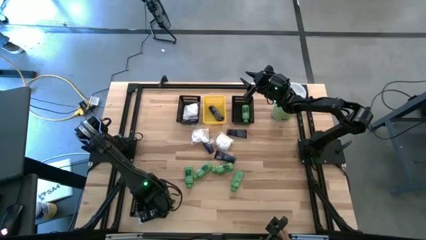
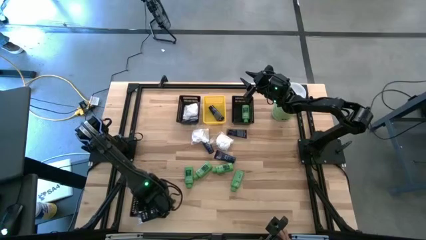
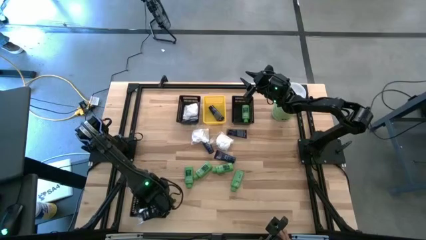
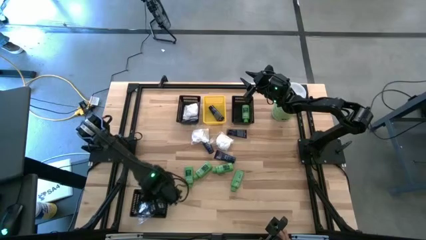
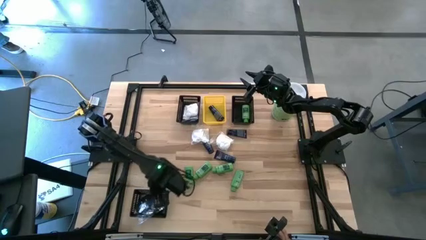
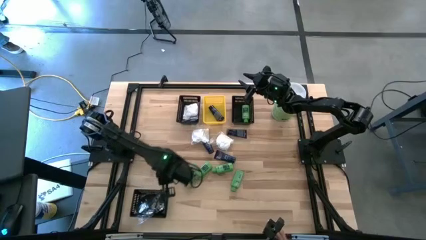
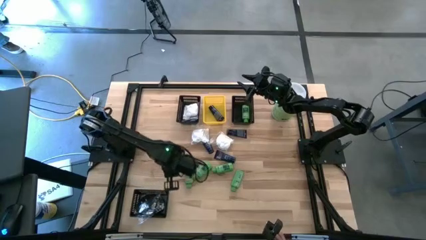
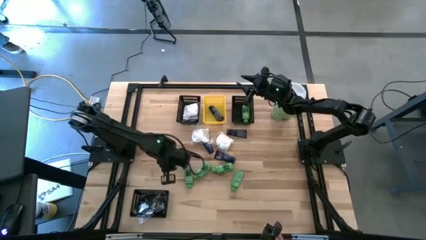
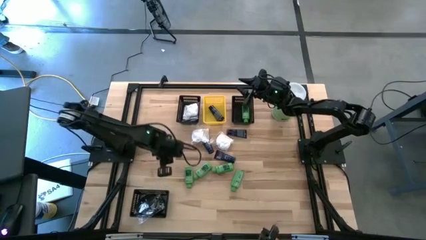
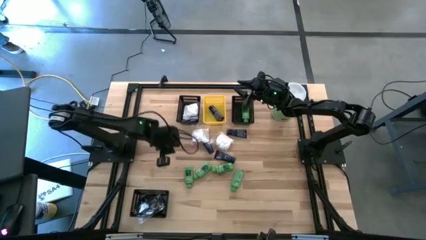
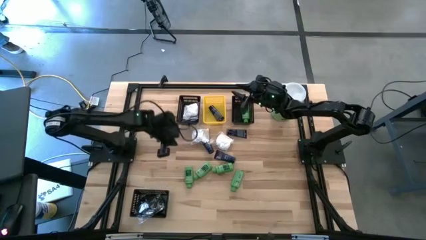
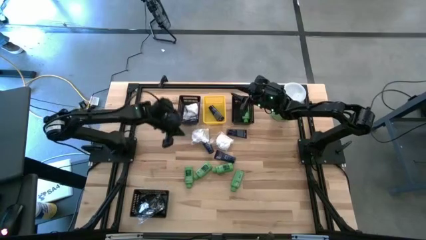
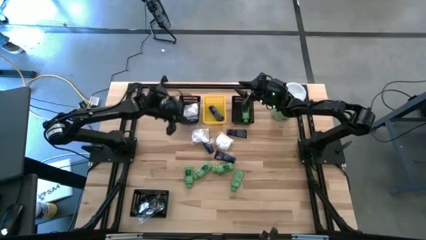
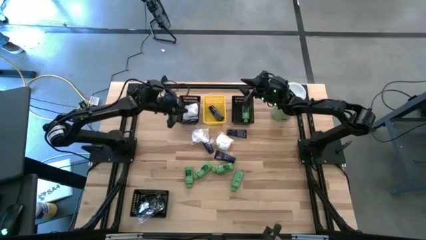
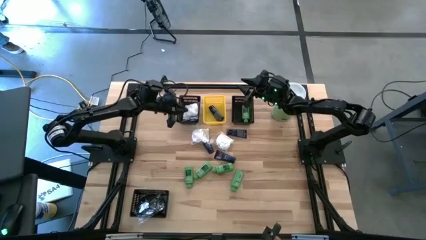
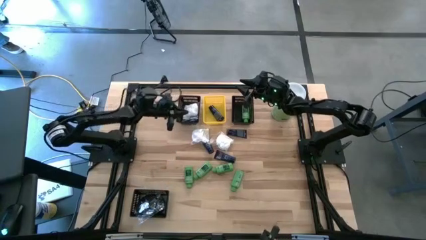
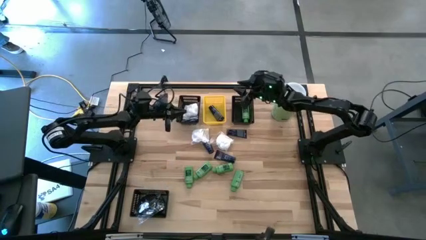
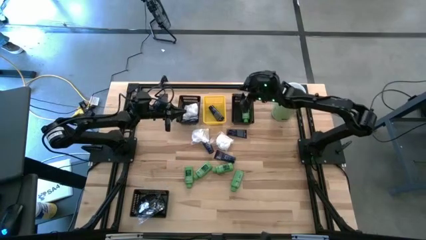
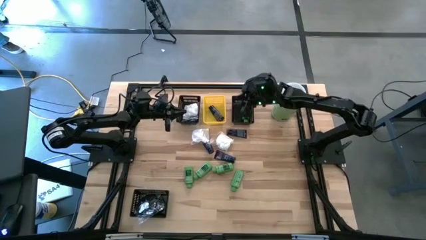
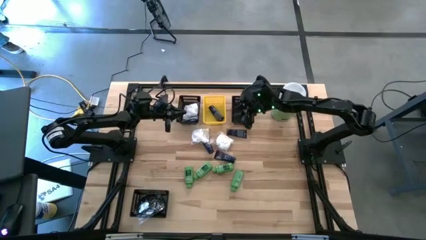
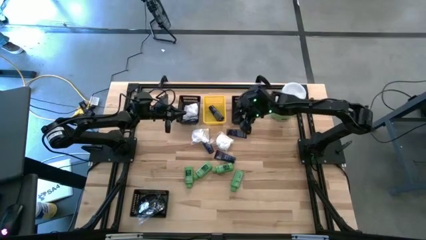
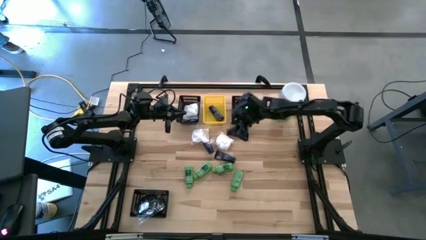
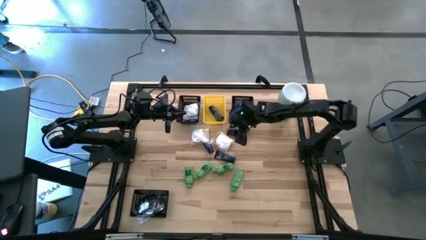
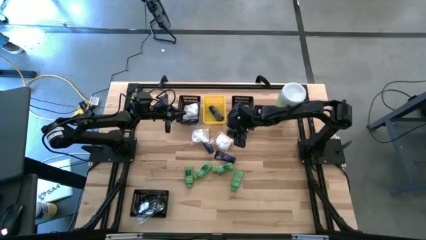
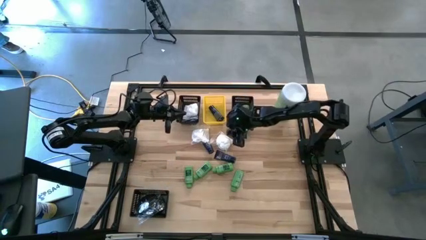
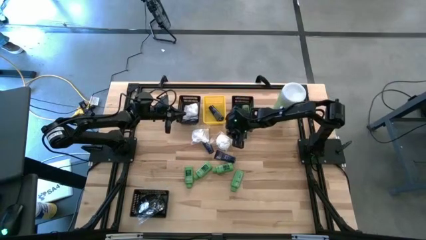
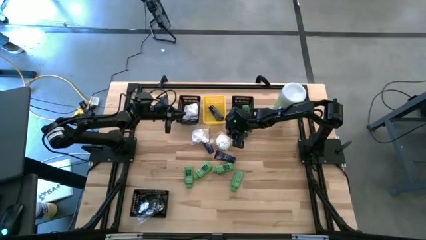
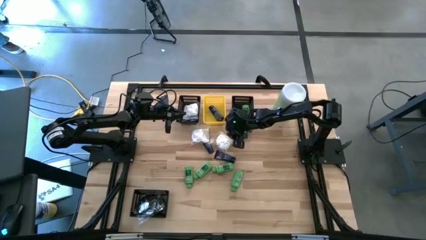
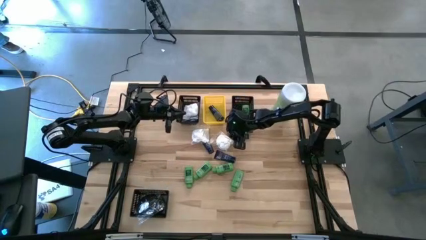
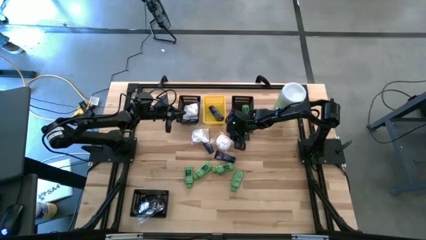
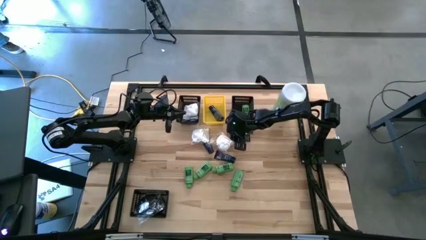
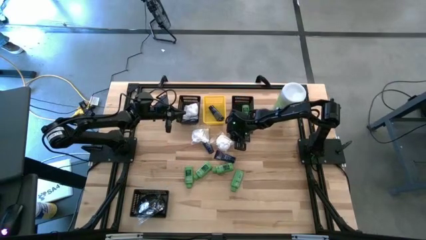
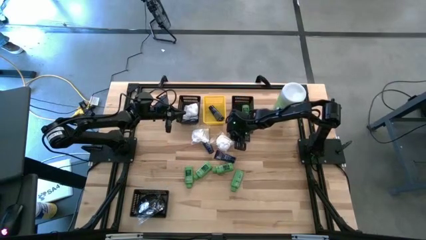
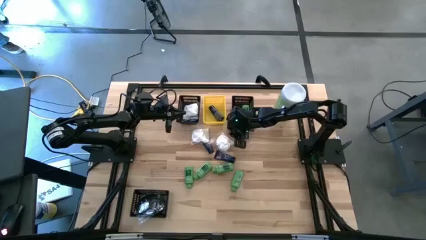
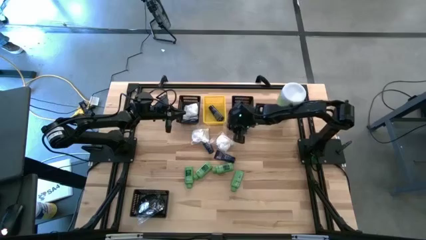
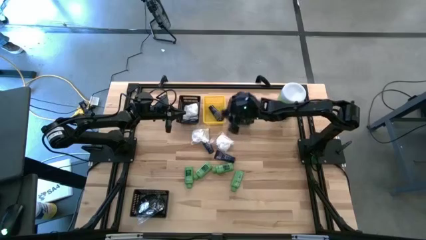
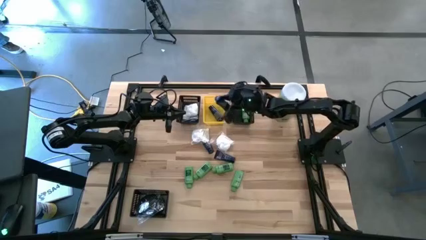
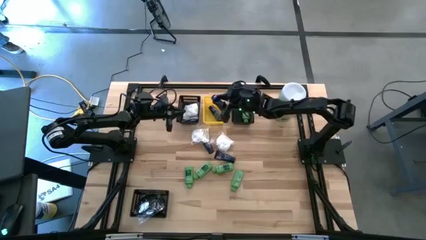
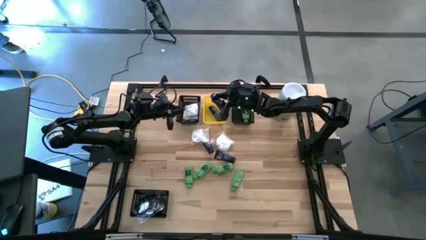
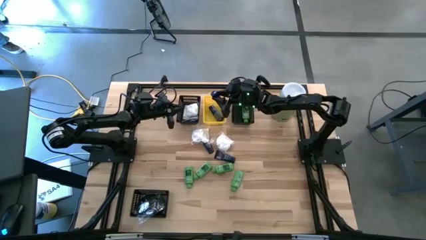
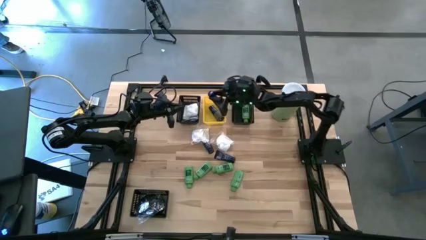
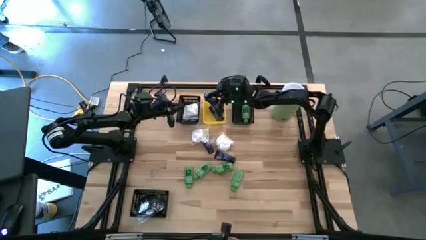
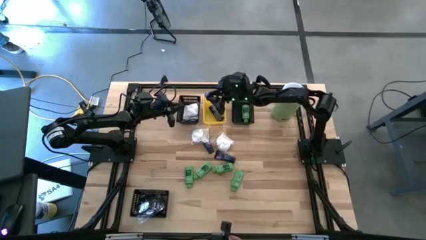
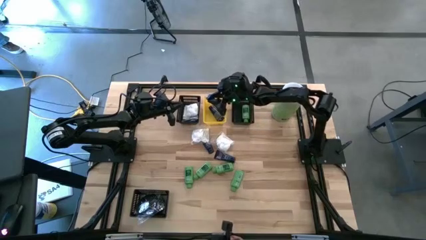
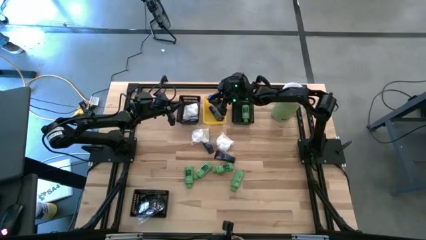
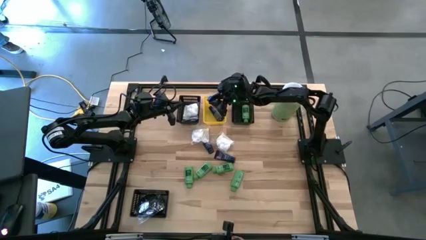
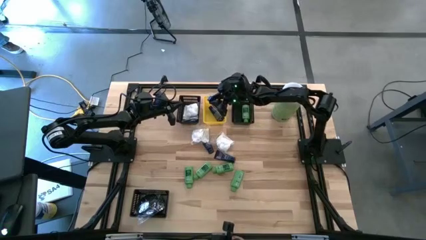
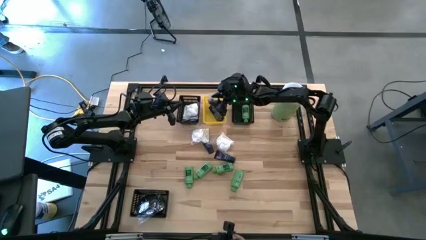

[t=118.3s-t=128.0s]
Task: Pick & Place Travel size toiletries
Put the blue shave cream bottle into the yellow bin

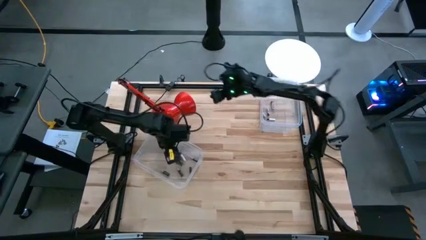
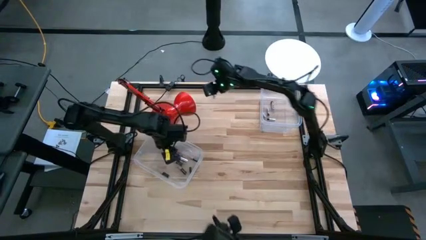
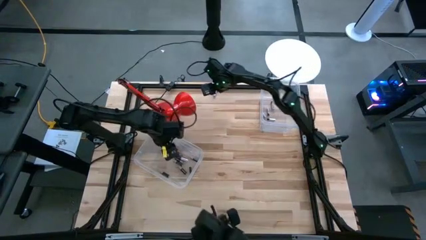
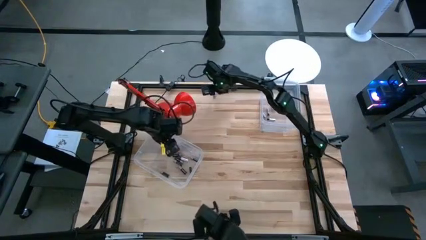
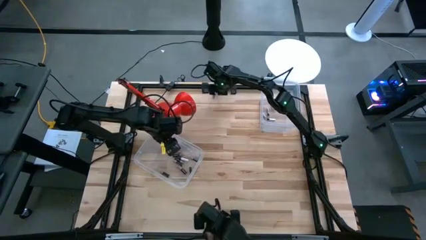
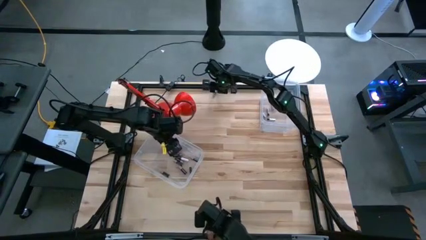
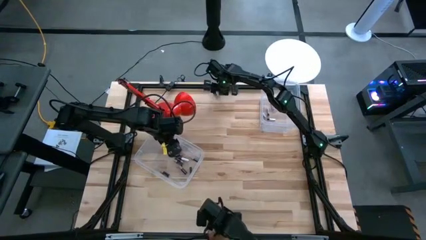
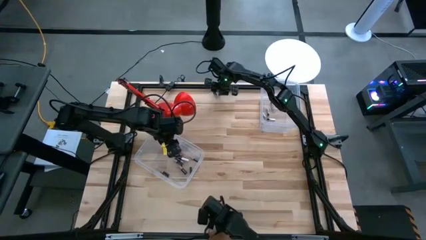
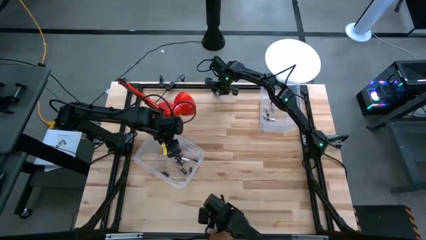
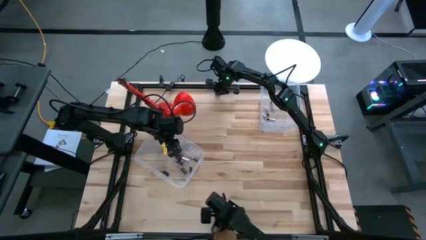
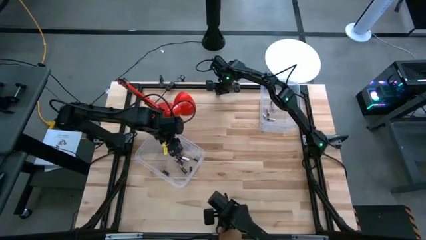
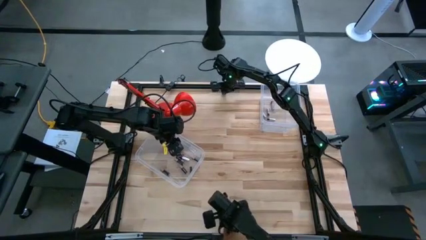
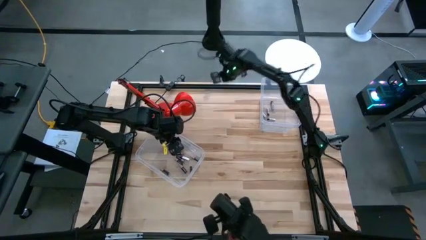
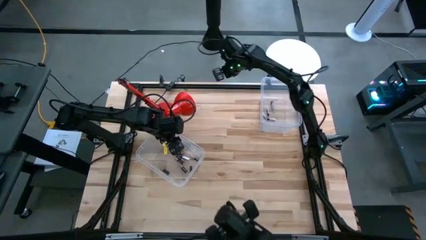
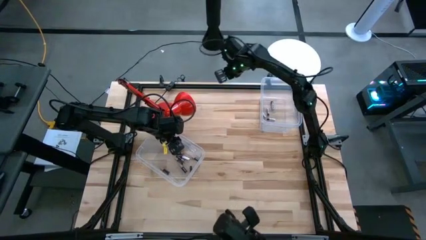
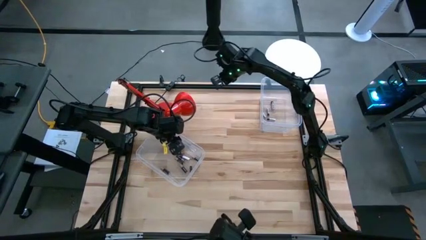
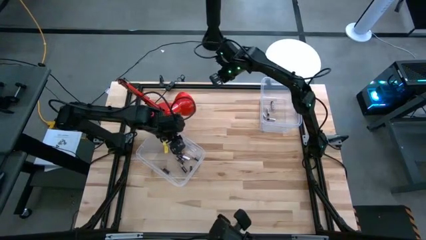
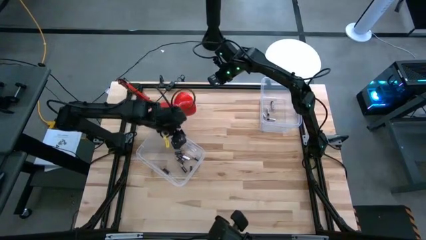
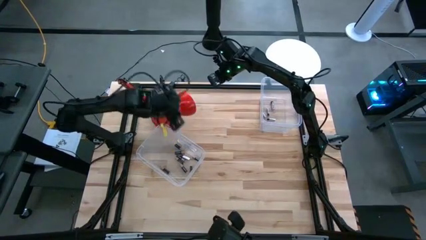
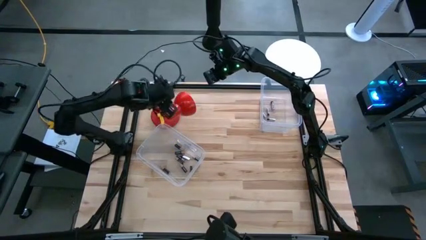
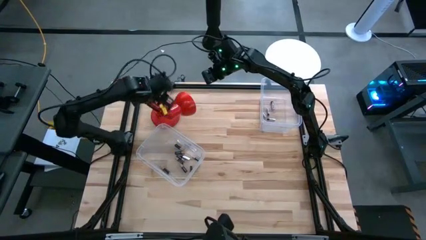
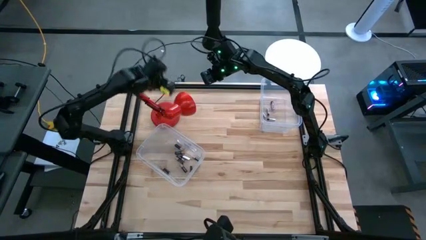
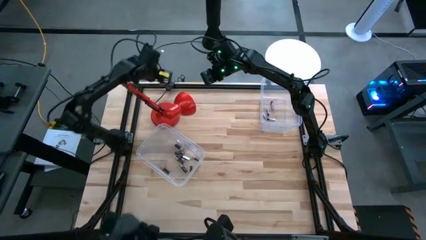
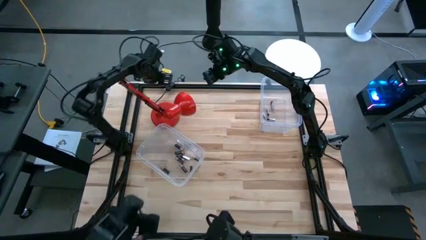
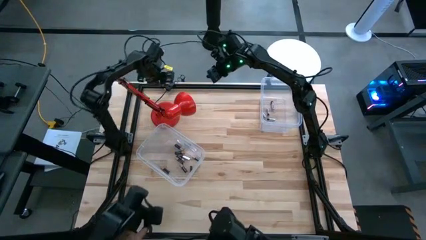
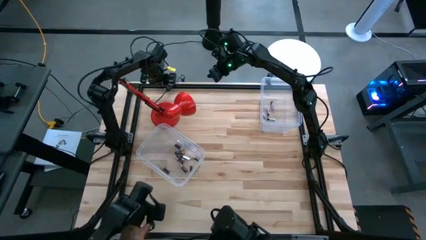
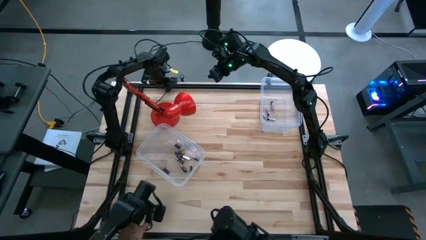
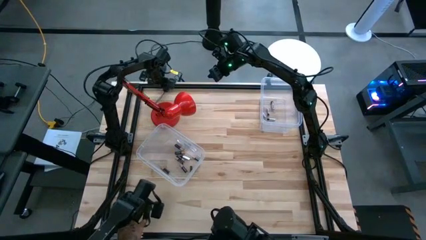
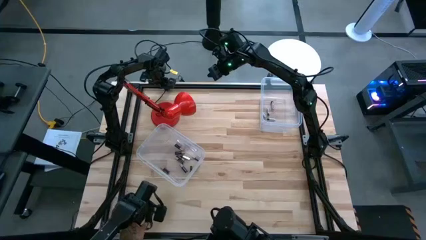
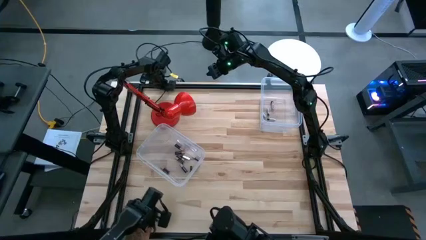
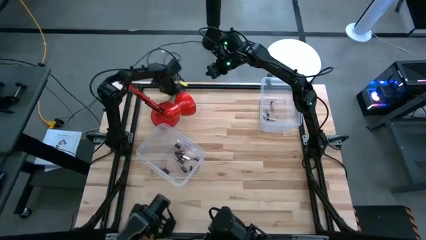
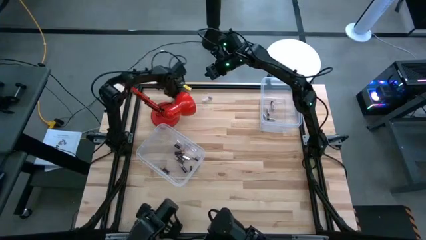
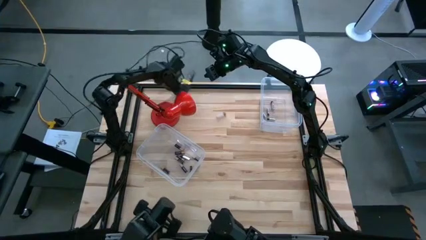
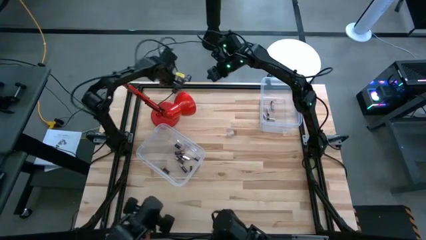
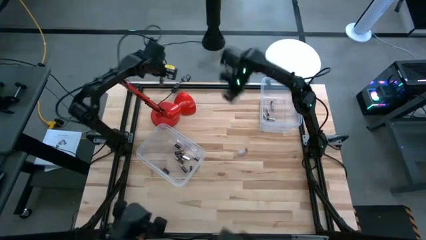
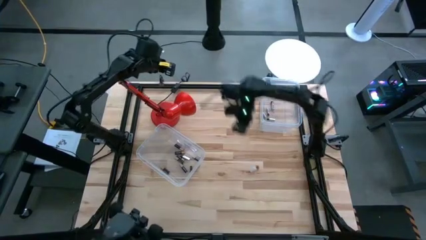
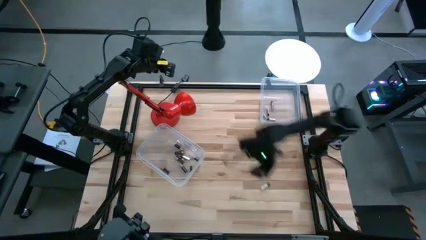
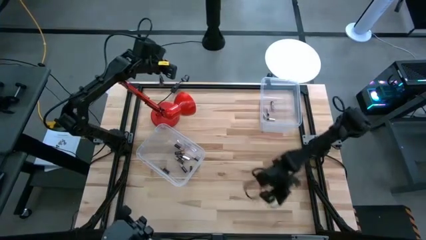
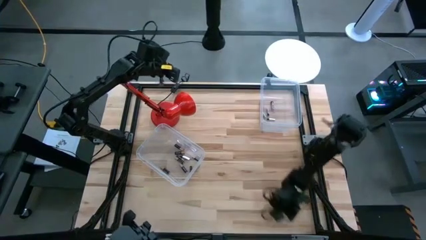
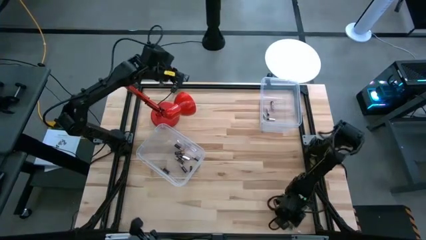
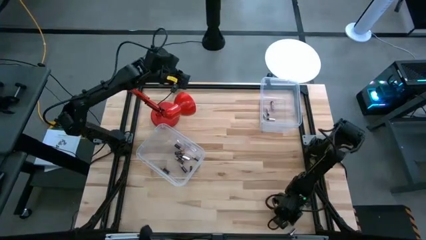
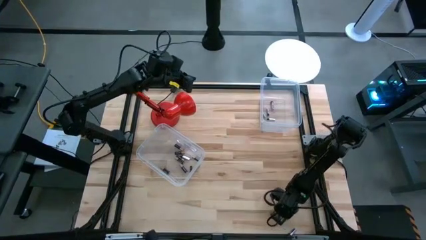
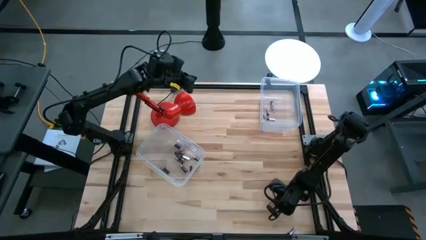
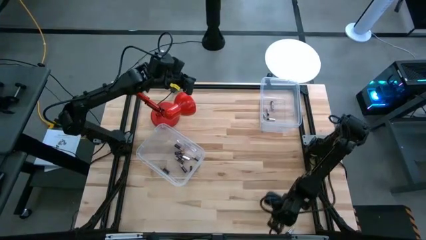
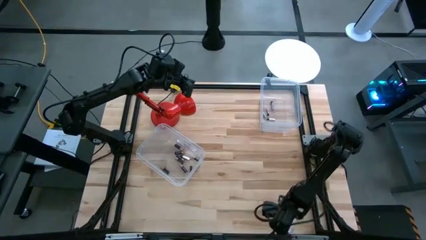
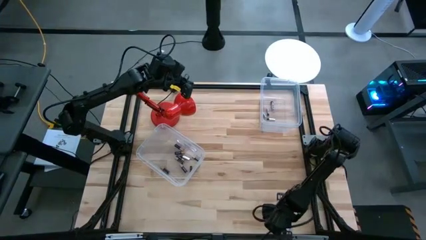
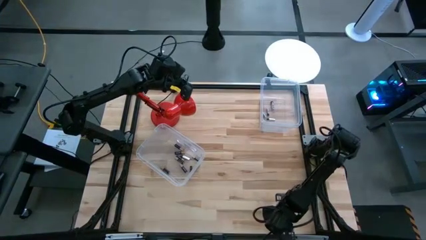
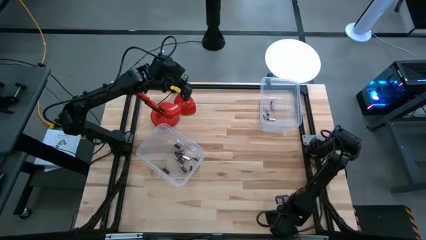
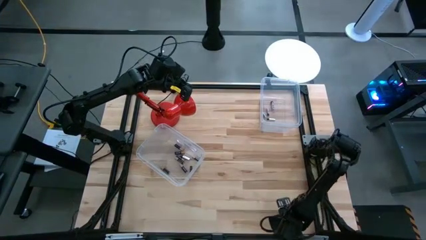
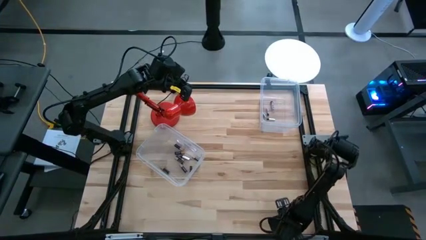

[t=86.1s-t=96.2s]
Task: Sort batteries
Put the silver battery into the top transparent bin
